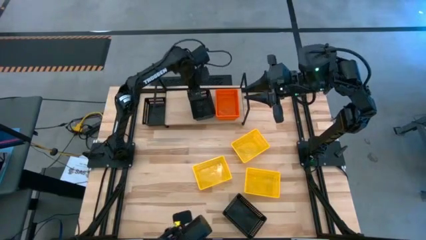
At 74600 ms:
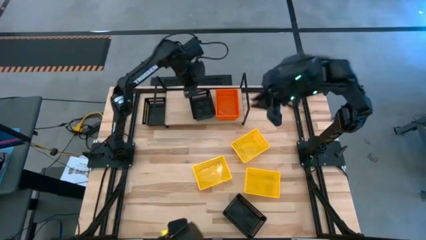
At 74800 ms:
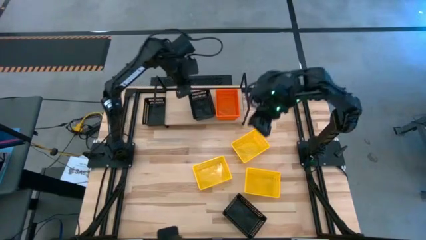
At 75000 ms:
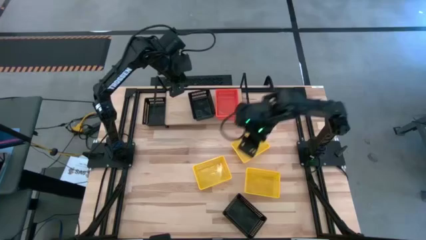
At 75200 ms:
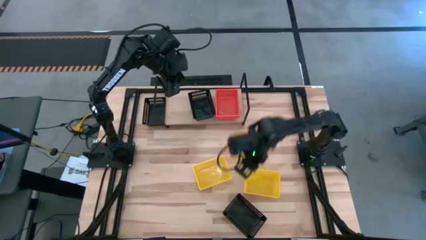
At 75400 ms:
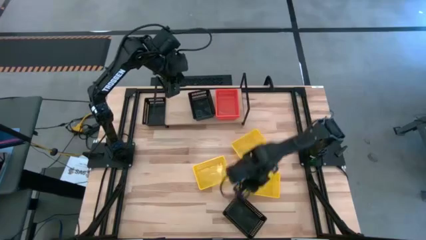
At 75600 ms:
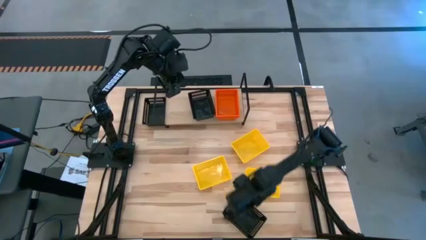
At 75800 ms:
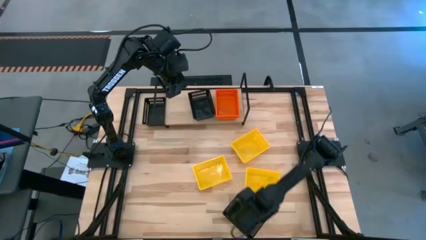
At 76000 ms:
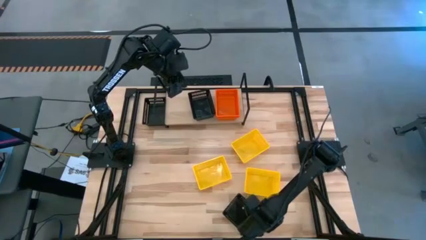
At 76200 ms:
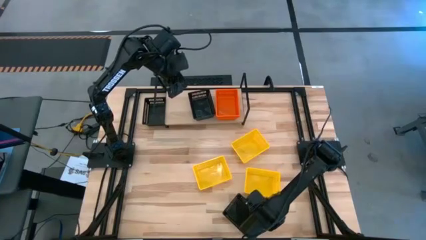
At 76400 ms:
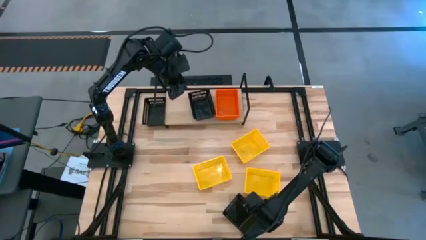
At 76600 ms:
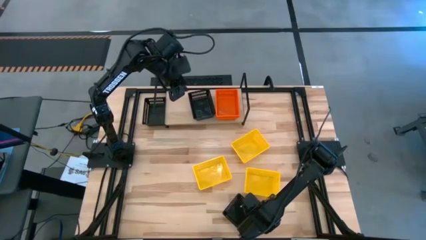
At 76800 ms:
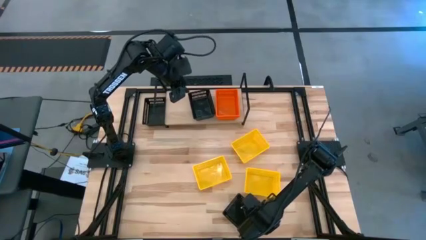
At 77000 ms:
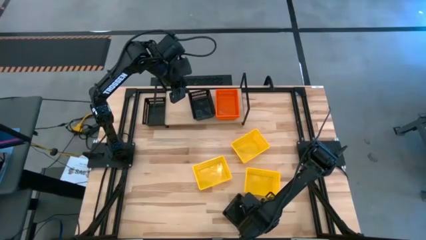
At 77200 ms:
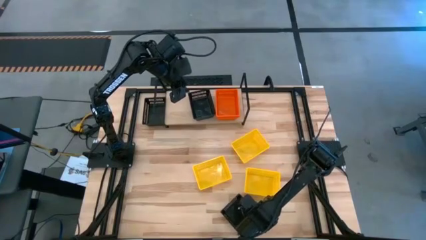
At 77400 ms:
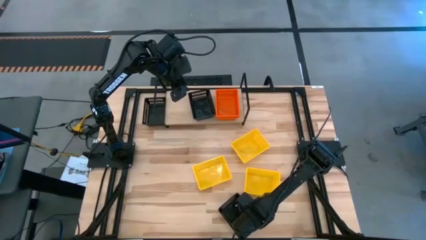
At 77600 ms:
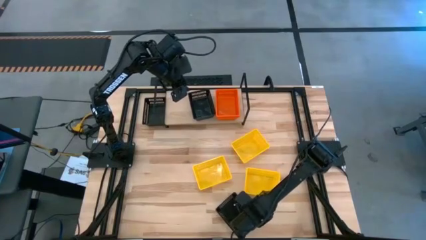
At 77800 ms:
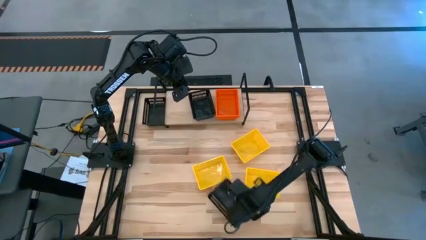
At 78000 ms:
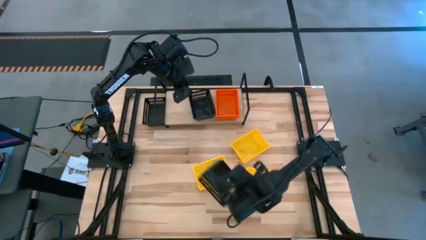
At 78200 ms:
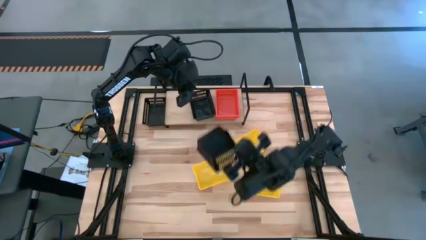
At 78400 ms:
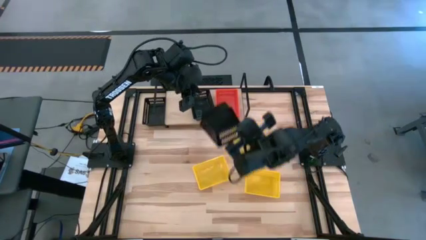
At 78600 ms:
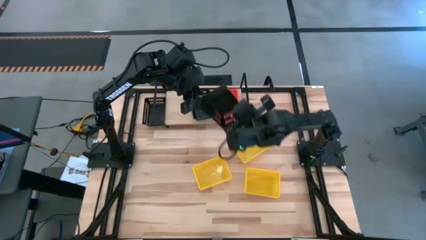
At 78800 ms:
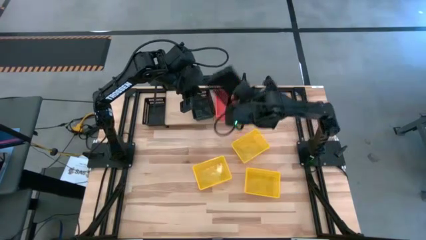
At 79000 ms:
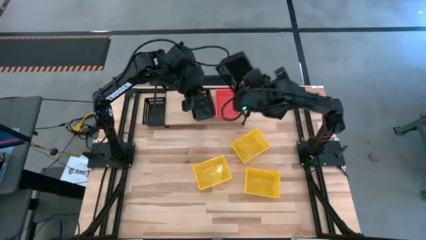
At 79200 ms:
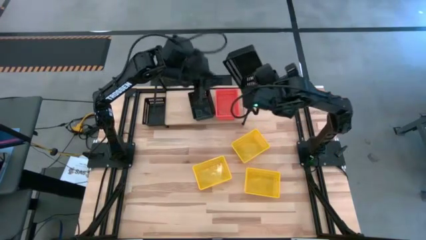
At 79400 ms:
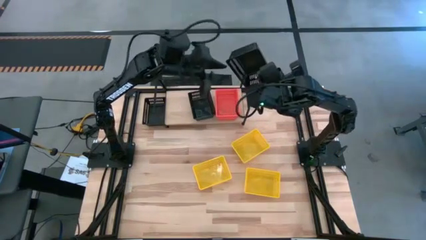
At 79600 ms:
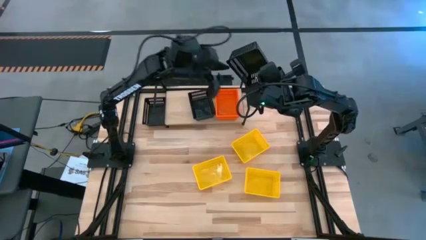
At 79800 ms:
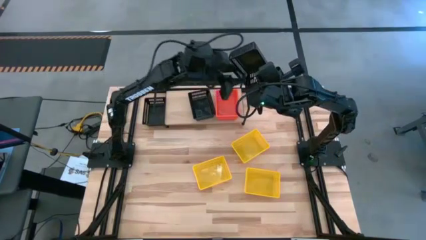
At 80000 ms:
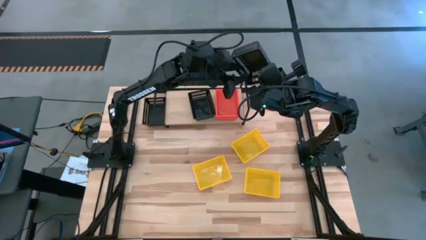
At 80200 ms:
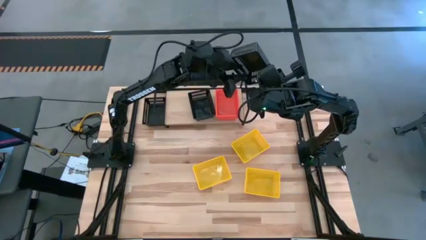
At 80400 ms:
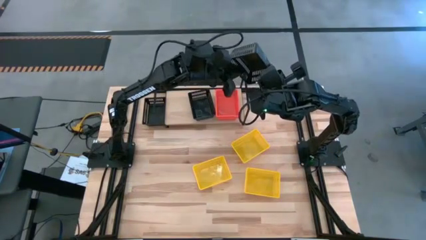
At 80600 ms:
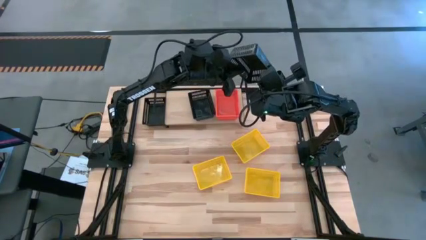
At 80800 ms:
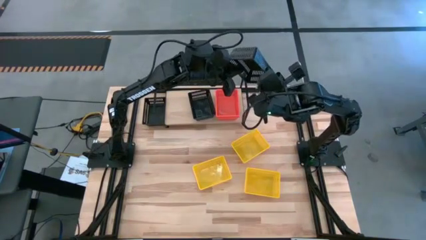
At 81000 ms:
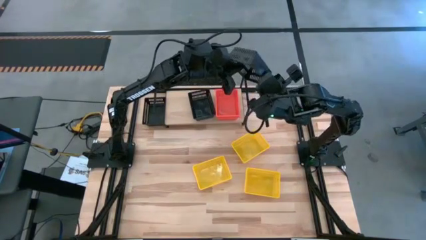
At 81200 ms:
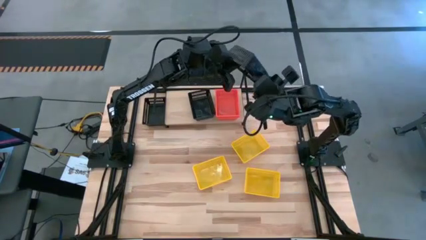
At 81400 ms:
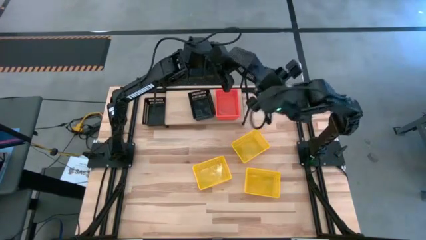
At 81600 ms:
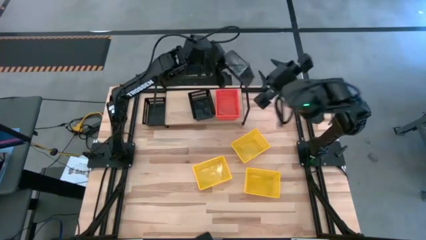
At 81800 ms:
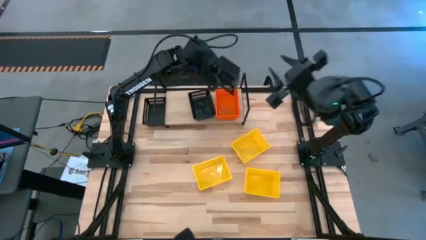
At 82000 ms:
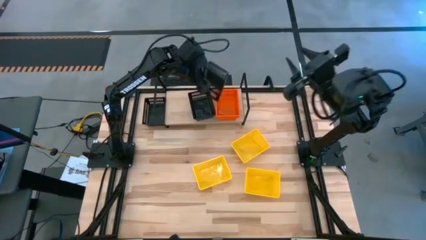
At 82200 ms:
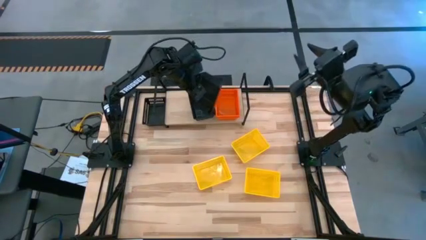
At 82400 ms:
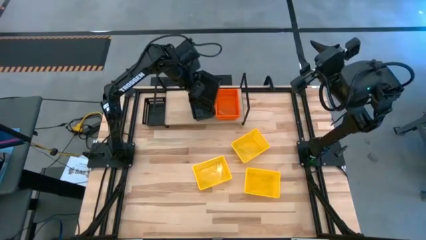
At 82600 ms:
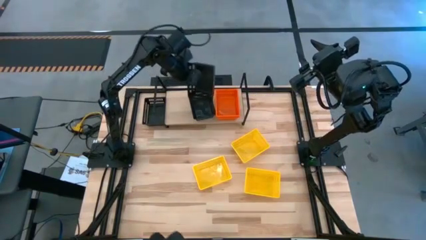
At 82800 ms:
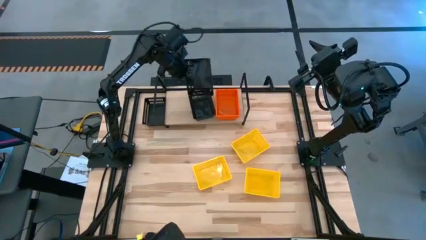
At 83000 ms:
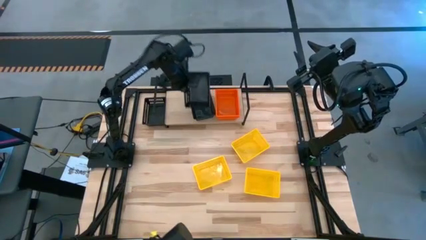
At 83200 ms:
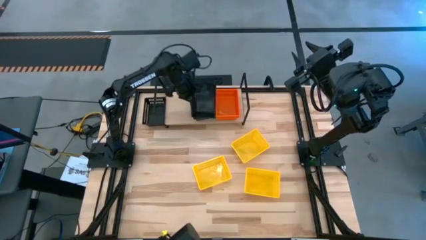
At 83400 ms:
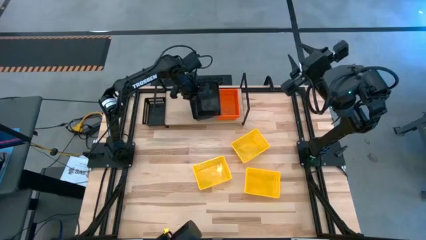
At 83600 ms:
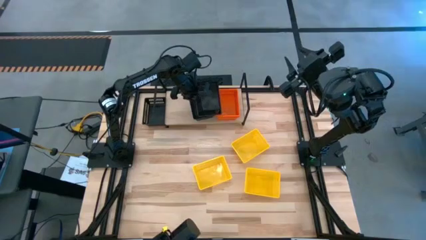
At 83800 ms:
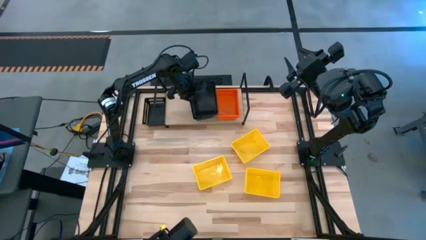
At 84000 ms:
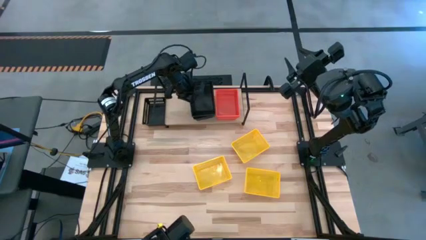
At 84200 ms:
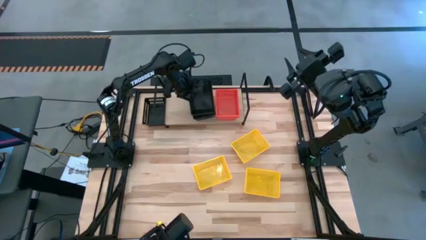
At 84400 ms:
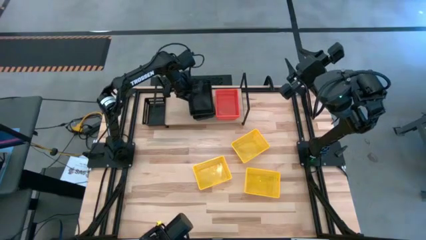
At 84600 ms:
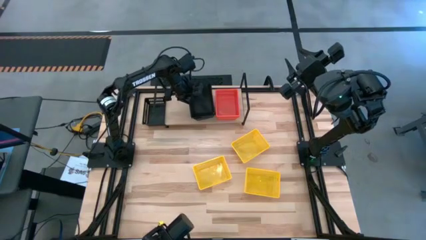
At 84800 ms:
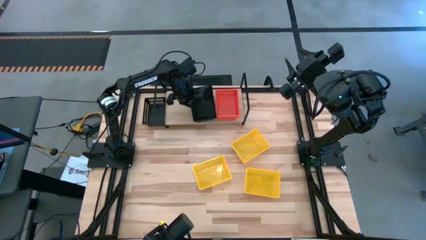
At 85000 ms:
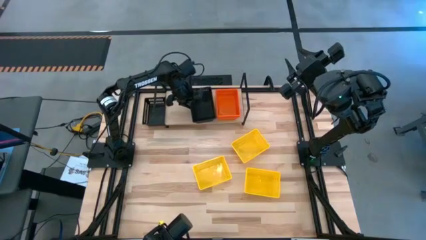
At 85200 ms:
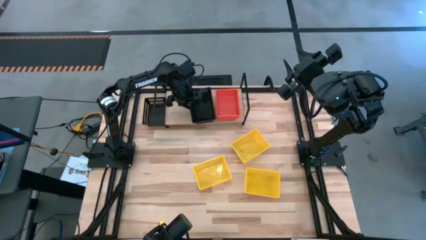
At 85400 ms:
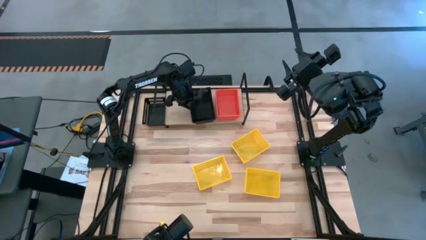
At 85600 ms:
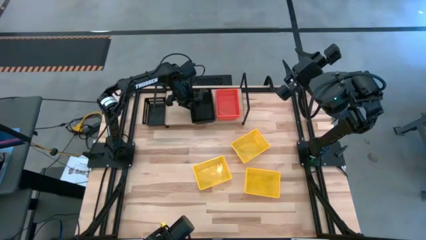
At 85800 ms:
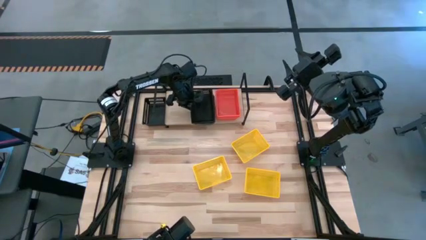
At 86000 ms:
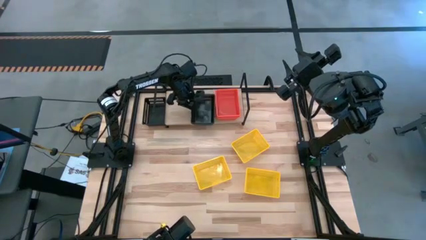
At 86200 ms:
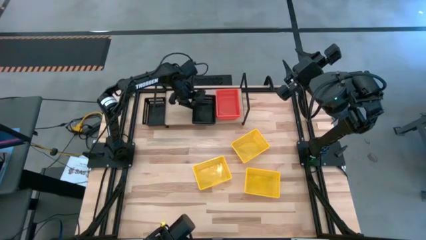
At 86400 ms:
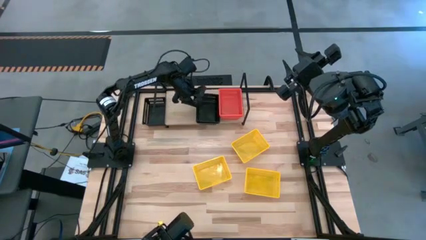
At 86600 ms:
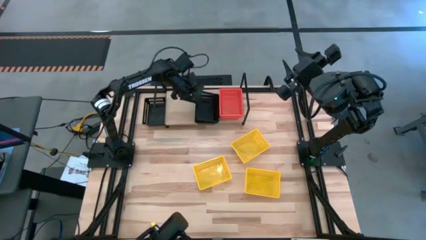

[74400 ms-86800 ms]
Task: Stack baskets on shelf by color
Stack the bottom black bin on top of the black bin on the shelf
